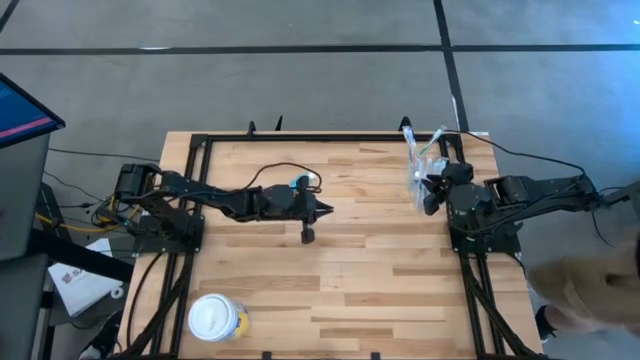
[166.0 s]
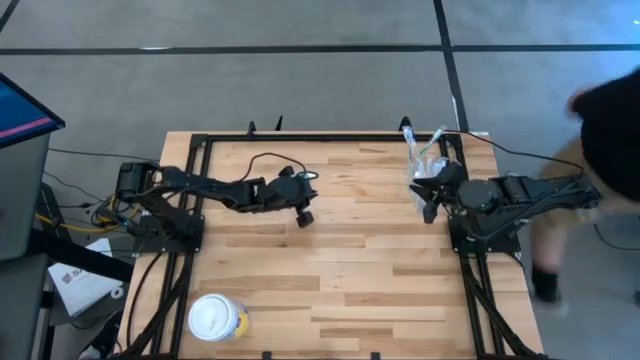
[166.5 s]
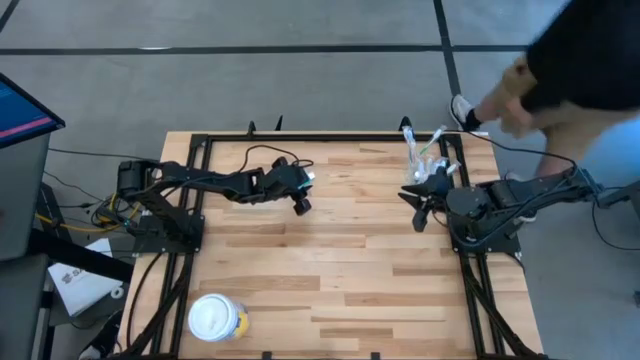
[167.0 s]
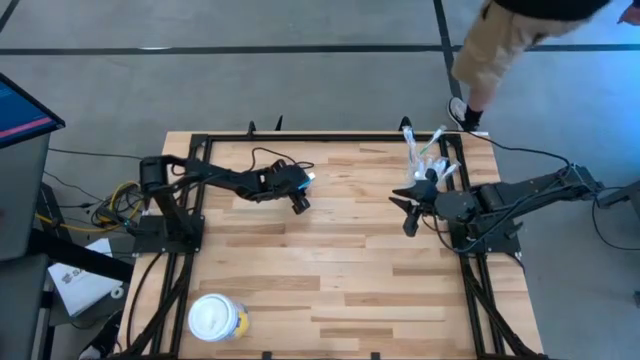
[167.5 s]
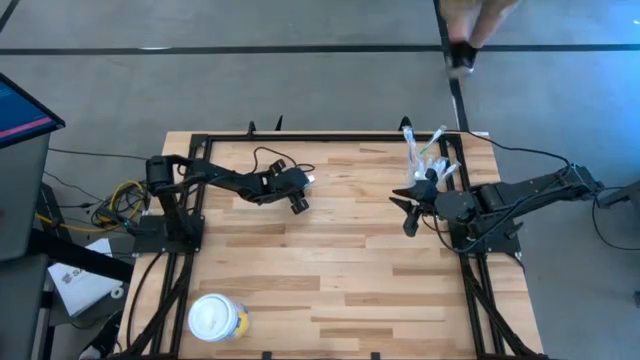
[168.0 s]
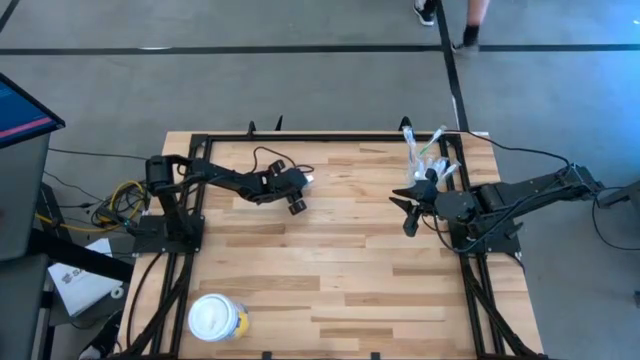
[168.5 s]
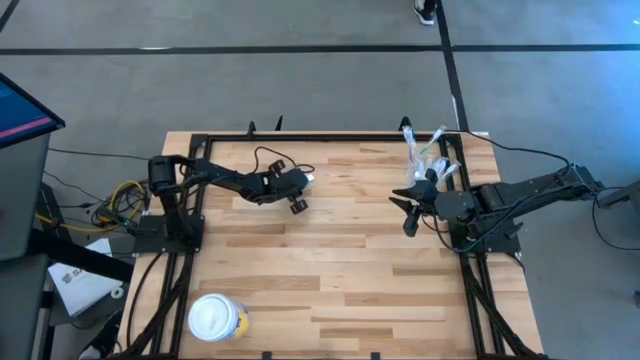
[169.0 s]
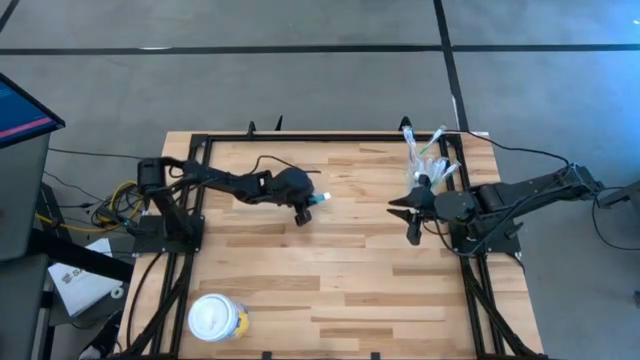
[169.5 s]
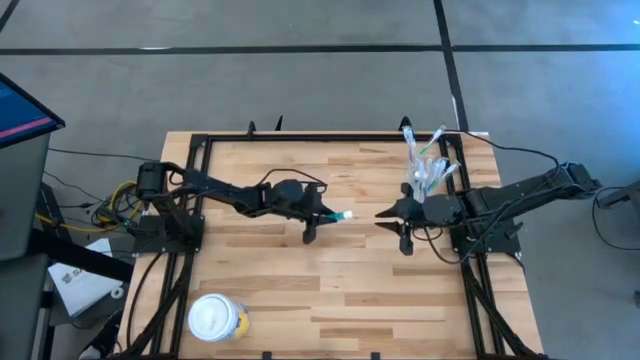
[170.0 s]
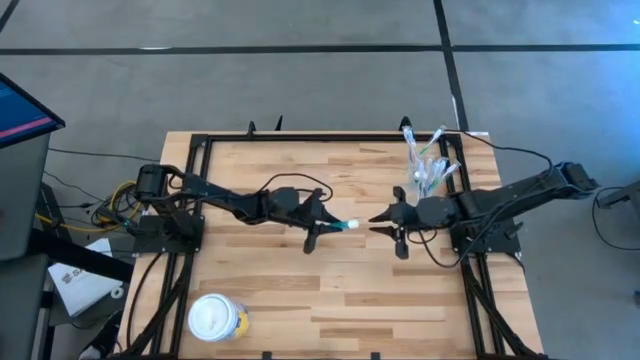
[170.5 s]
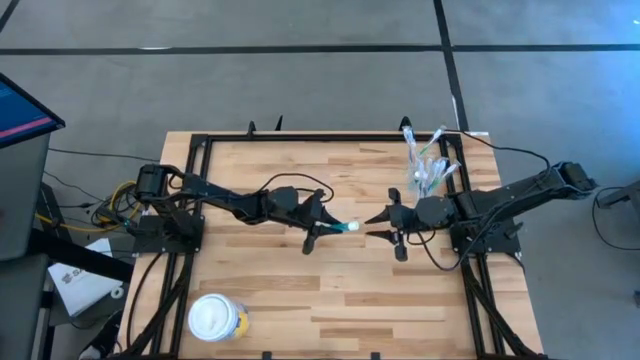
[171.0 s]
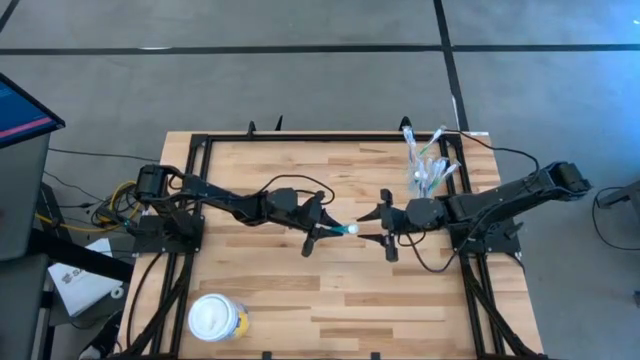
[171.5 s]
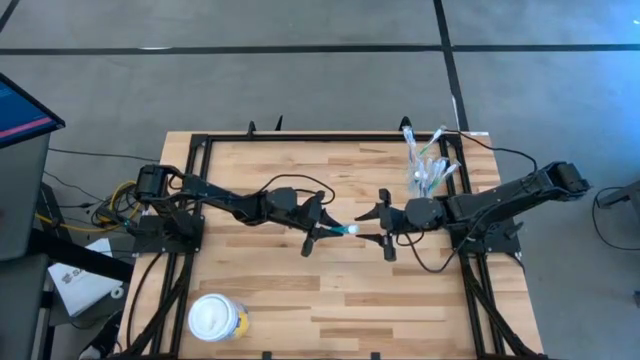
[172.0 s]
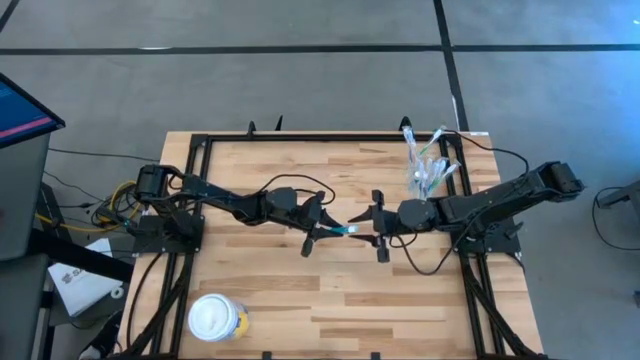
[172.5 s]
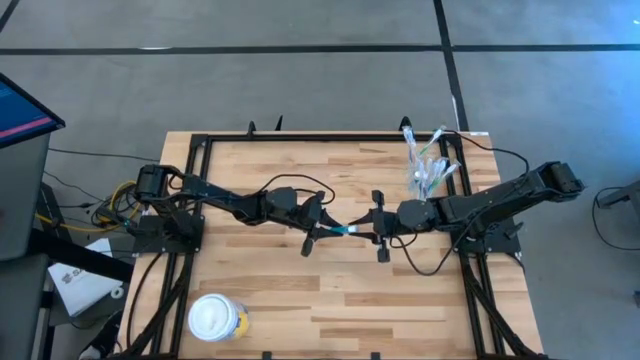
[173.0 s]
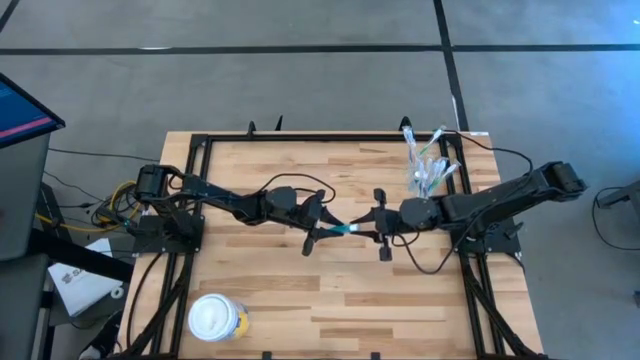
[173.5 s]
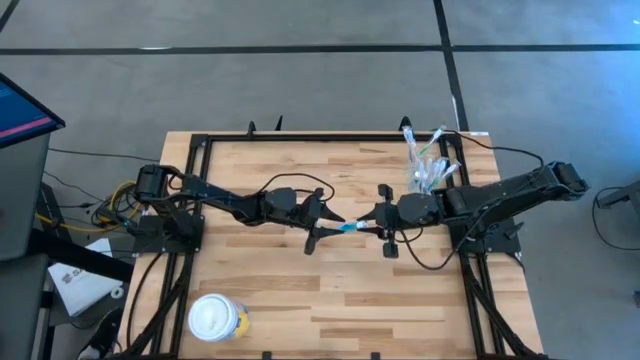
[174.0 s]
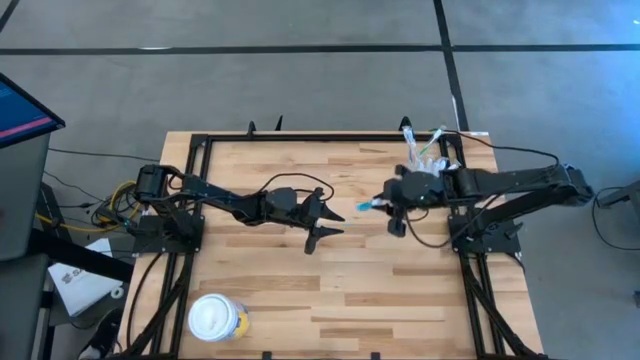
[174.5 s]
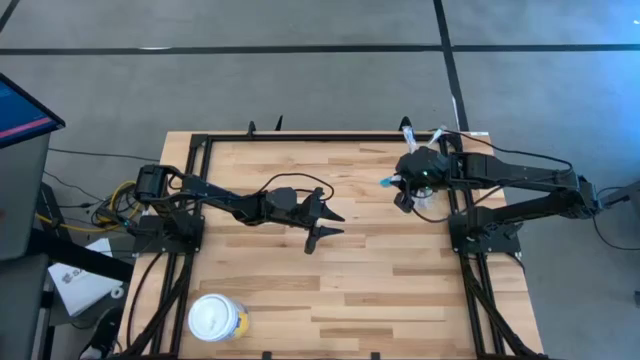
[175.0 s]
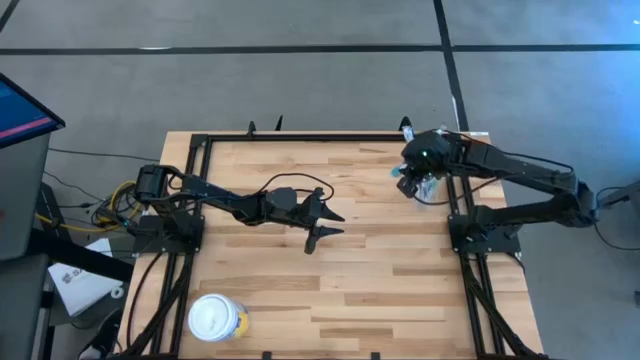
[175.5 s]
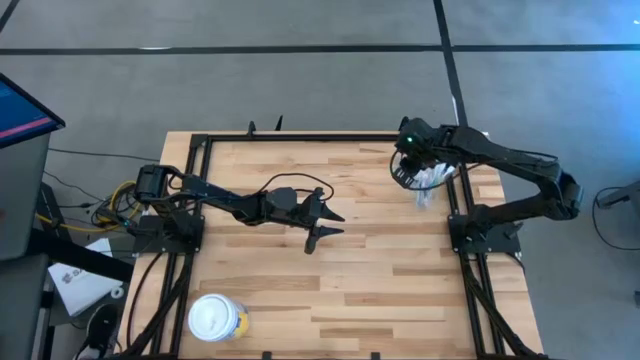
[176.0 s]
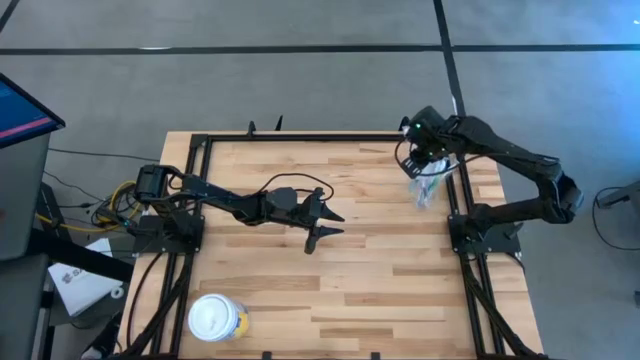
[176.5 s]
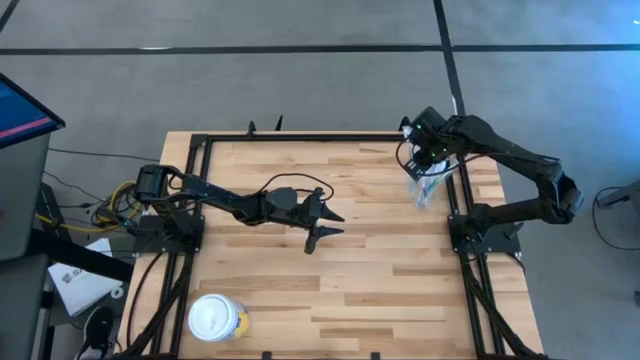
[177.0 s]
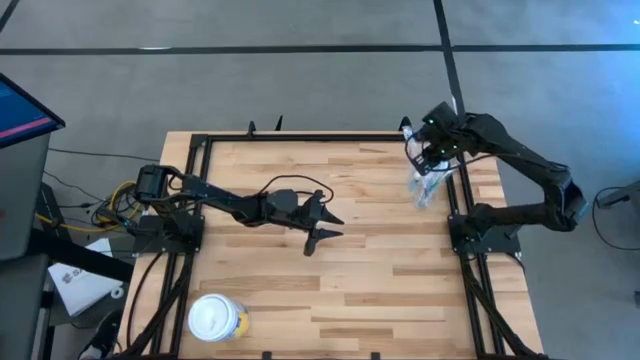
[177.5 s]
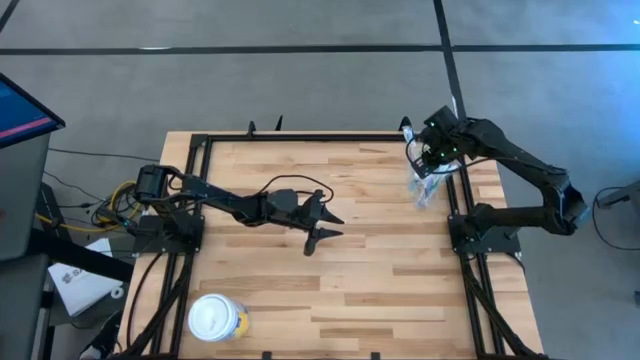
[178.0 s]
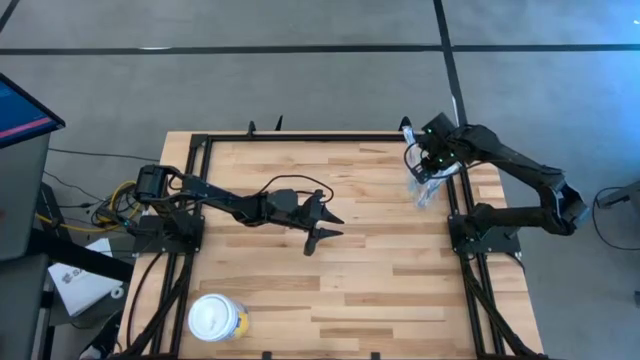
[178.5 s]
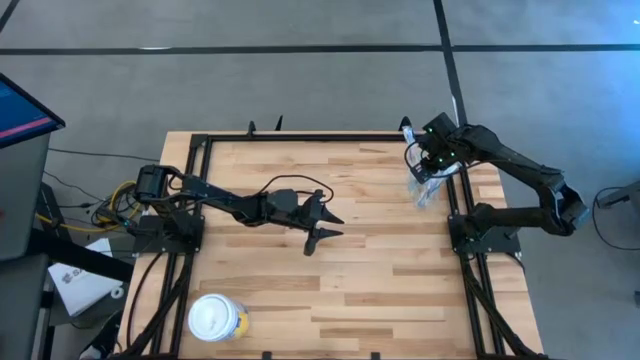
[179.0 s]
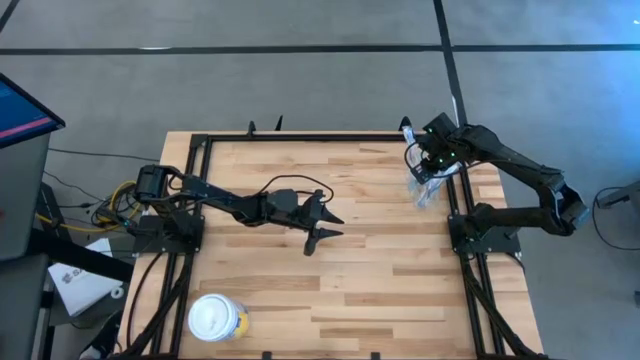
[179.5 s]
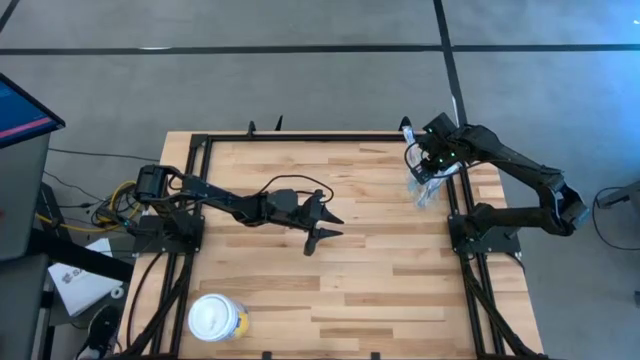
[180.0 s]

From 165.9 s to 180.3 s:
Task: Pick & Place toothbrushing station
Put the blue mouthwash into the transparent organizer

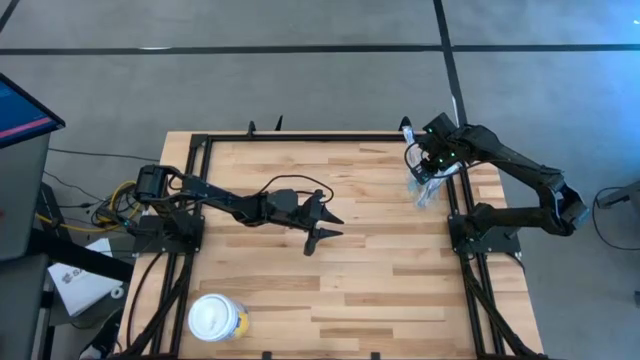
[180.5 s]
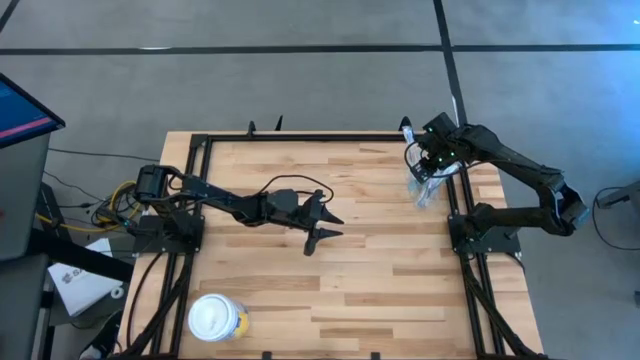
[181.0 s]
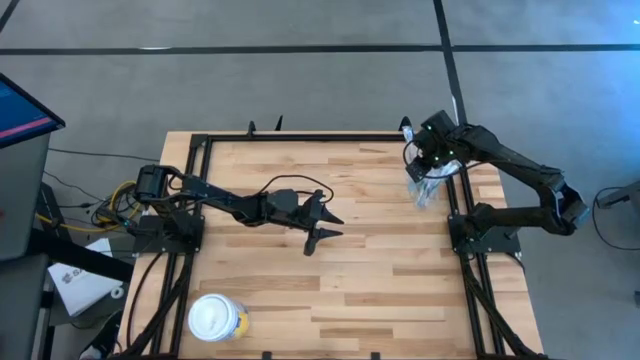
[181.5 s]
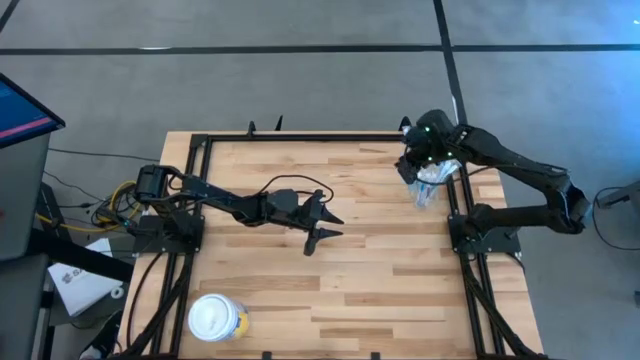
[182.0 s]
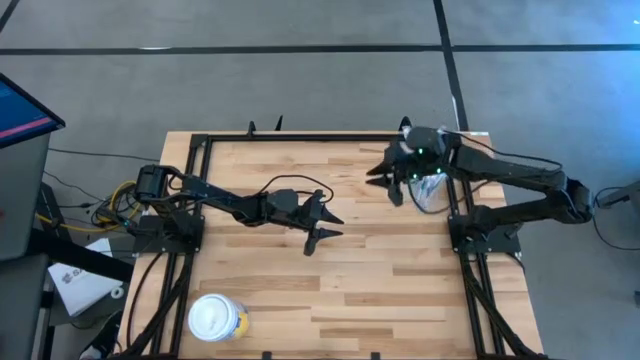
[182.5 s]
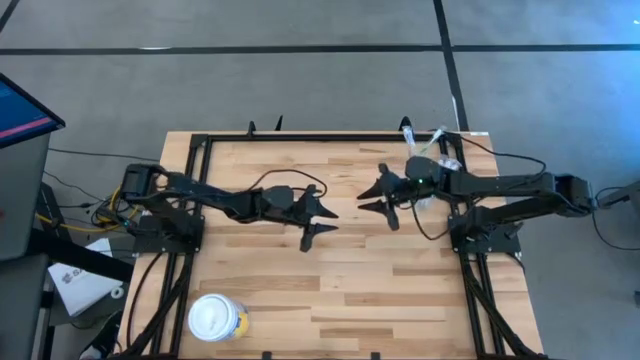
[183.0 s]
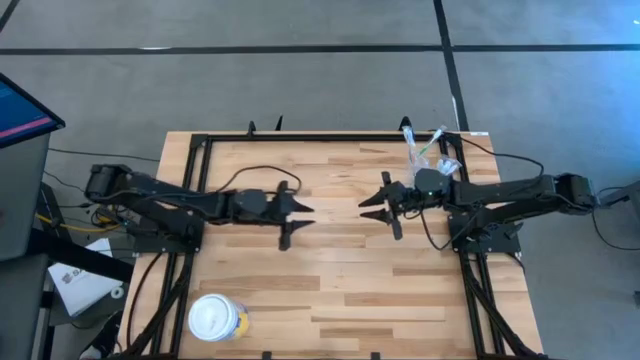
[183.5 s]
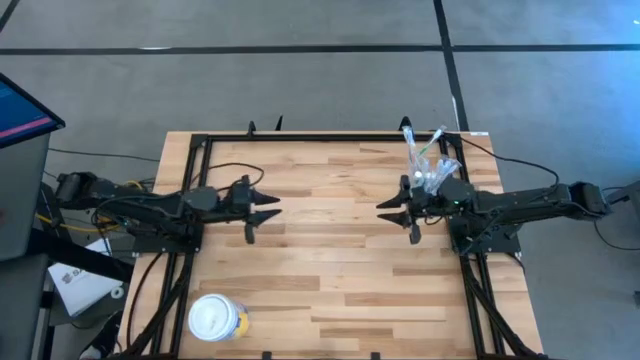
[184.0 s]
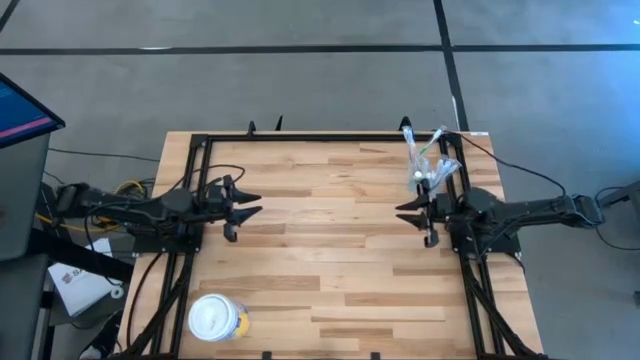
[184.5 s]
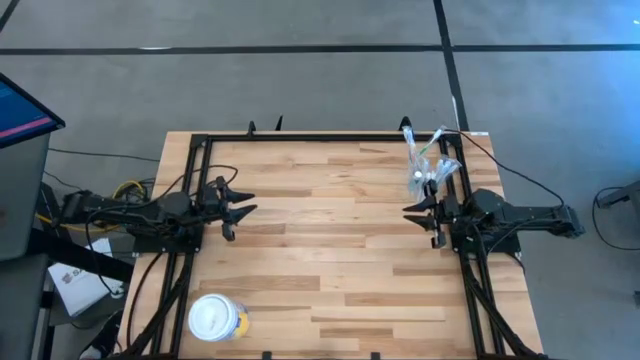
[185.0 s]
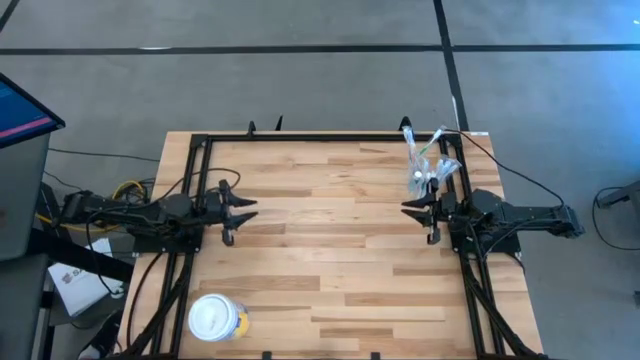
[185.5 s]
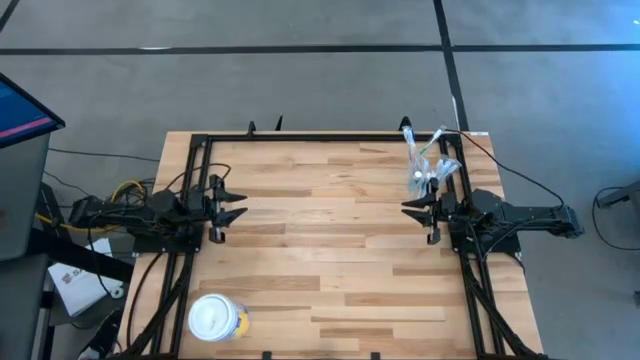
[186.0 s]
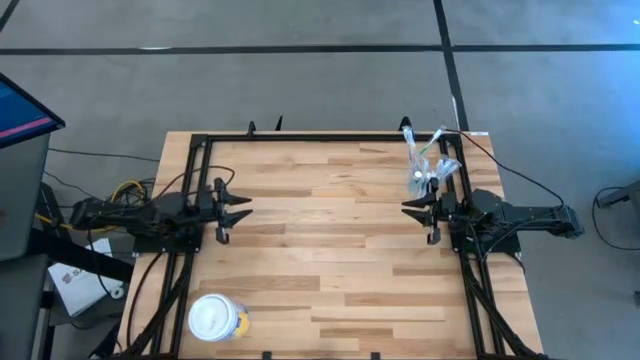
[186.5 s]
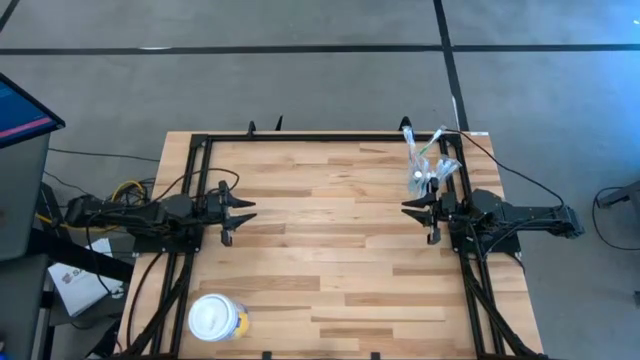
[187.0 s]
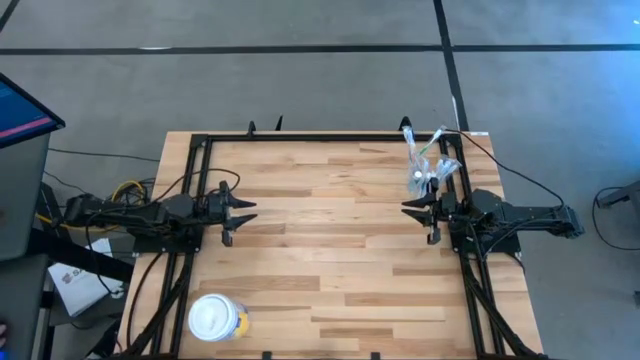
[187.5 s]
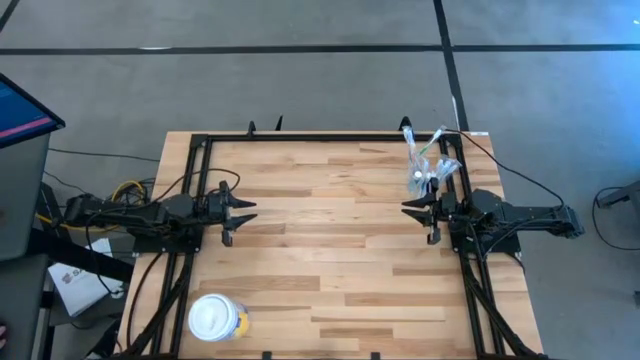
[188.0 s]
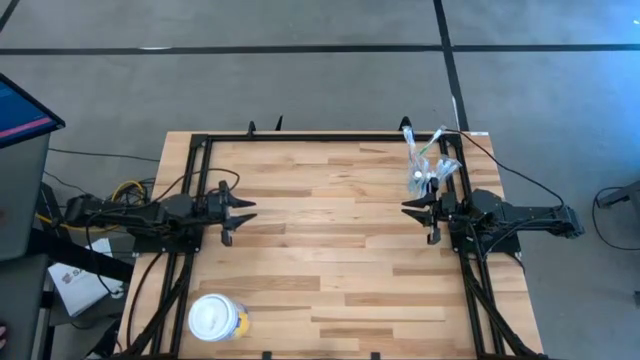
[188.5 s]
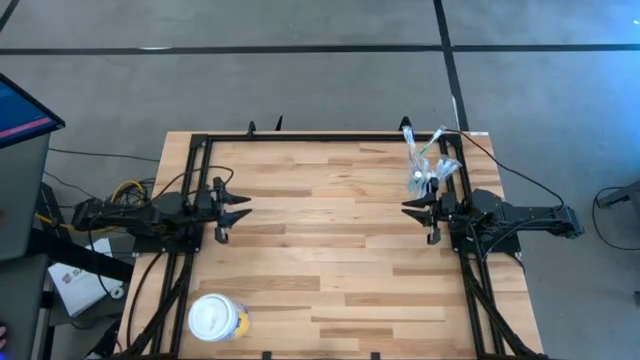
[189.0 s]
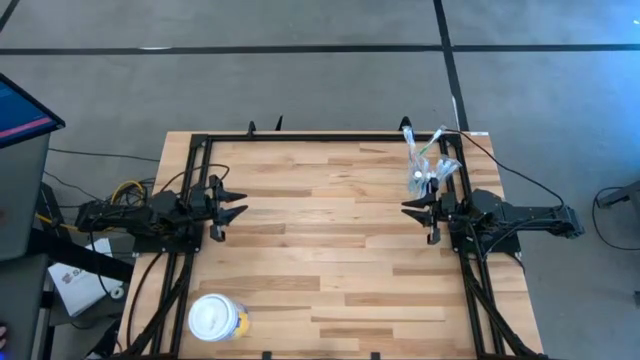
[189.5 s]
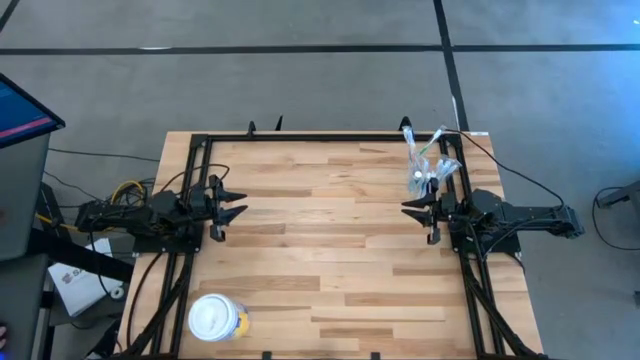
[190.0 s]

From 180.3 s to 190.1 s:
Return to Home Position
